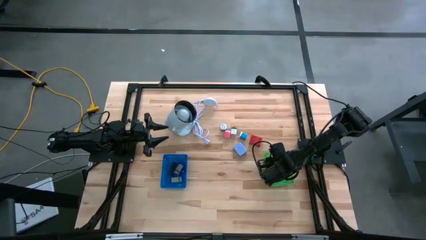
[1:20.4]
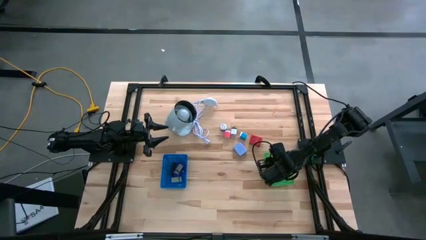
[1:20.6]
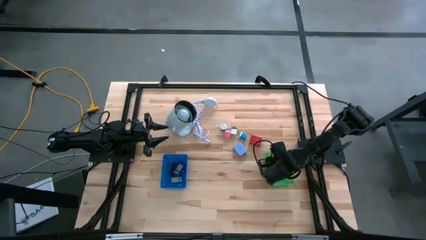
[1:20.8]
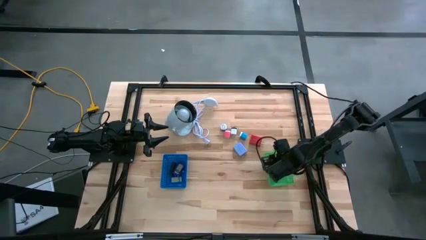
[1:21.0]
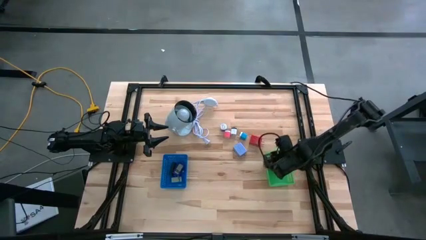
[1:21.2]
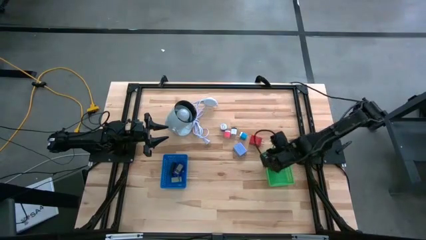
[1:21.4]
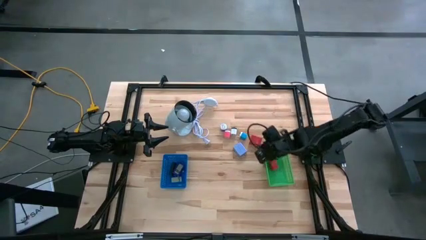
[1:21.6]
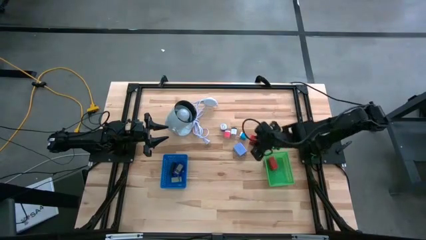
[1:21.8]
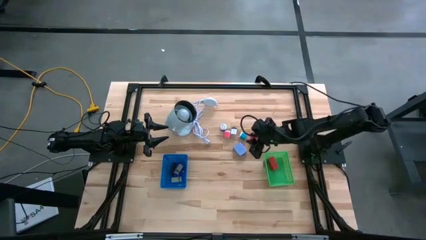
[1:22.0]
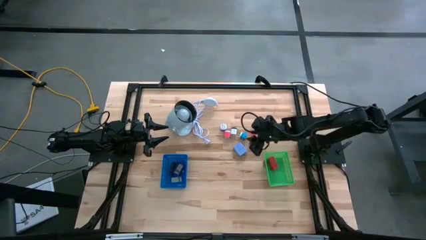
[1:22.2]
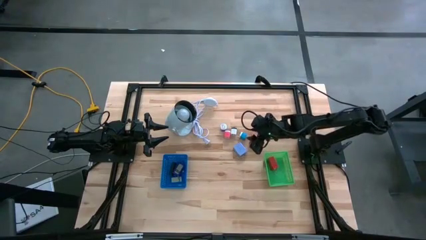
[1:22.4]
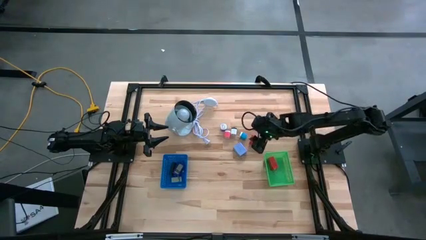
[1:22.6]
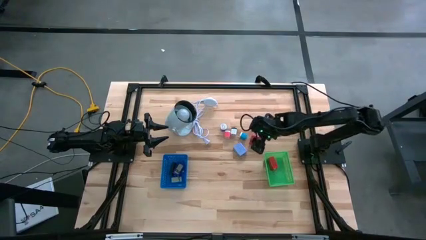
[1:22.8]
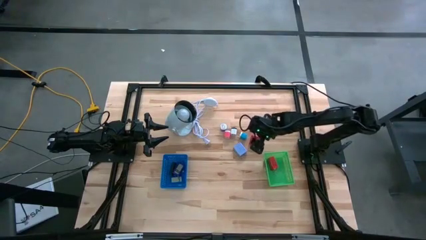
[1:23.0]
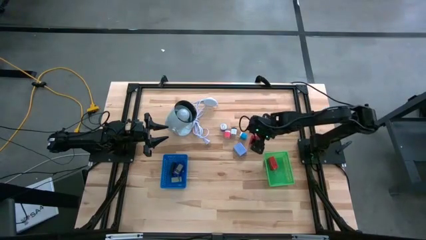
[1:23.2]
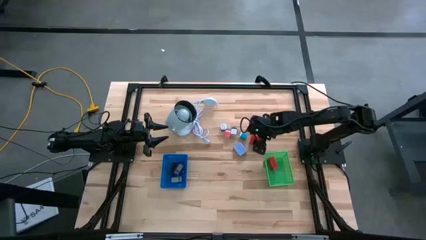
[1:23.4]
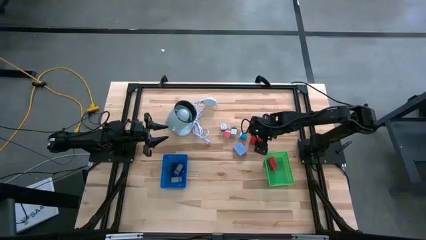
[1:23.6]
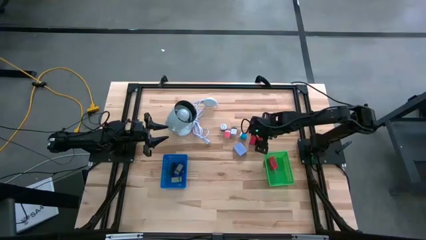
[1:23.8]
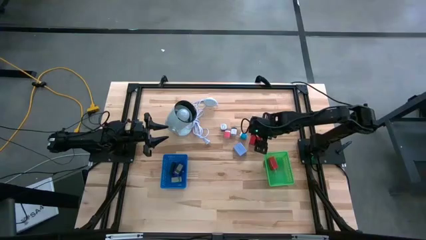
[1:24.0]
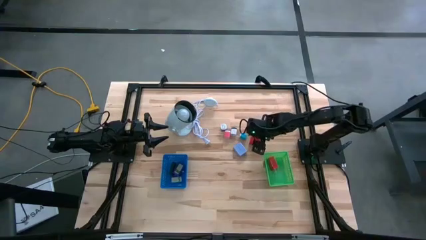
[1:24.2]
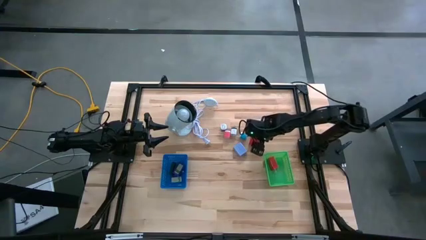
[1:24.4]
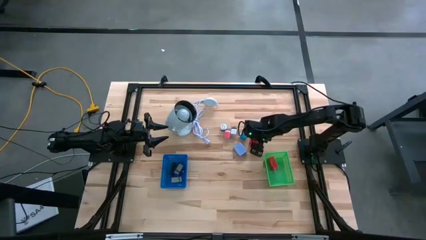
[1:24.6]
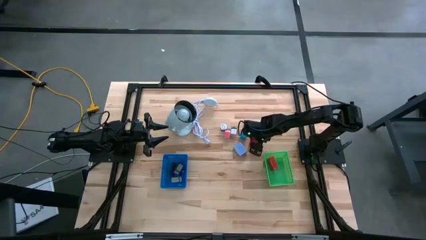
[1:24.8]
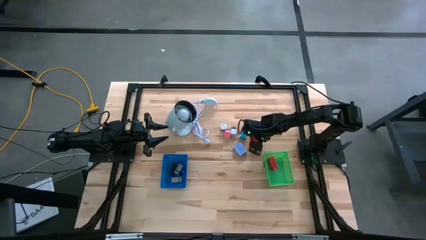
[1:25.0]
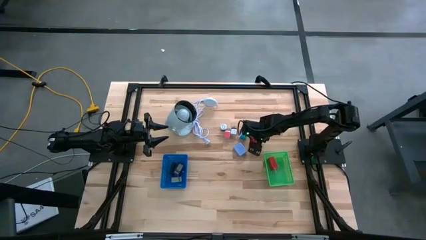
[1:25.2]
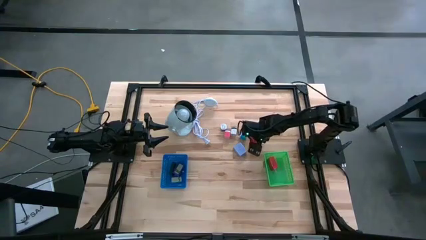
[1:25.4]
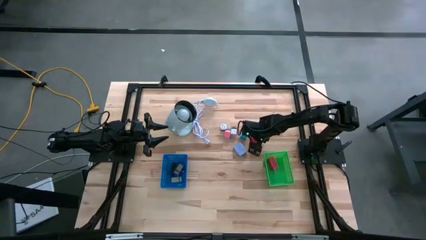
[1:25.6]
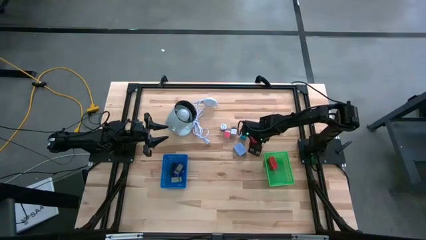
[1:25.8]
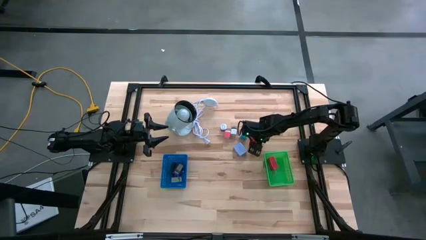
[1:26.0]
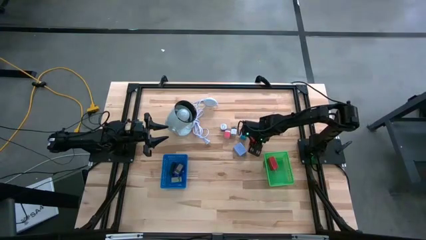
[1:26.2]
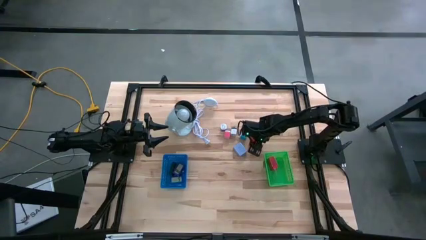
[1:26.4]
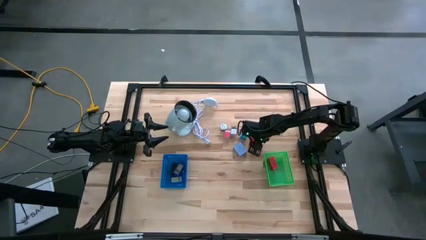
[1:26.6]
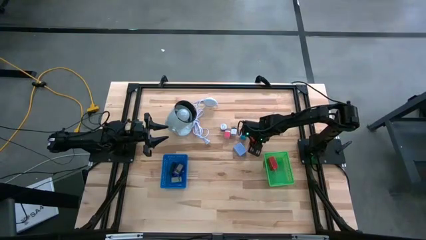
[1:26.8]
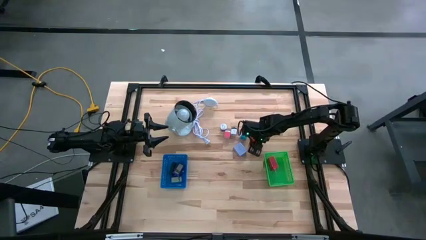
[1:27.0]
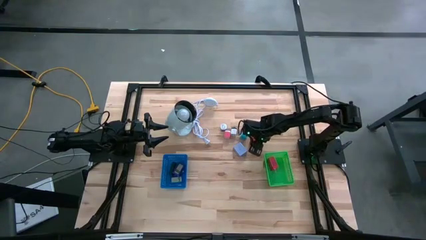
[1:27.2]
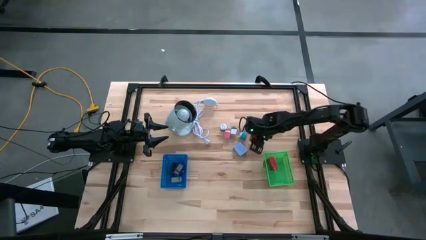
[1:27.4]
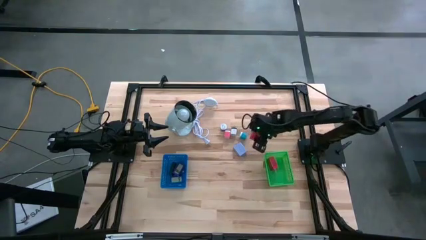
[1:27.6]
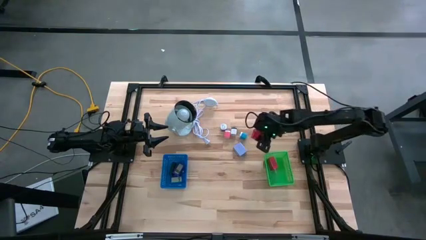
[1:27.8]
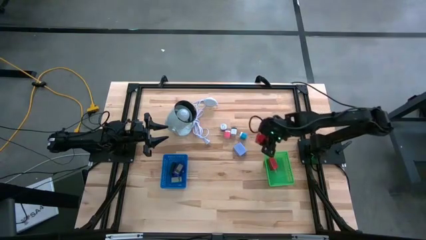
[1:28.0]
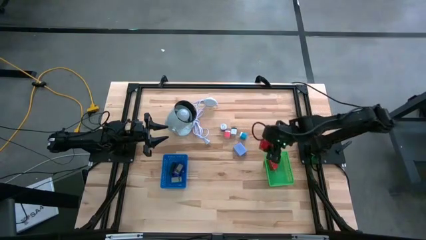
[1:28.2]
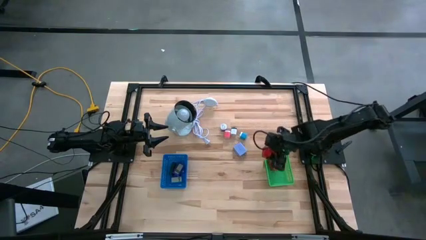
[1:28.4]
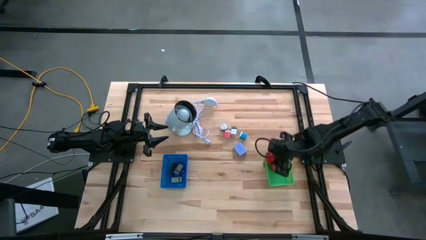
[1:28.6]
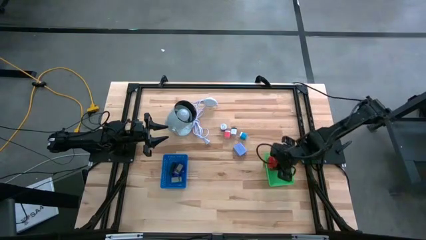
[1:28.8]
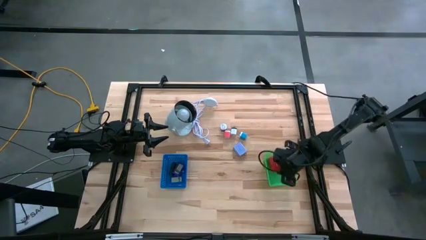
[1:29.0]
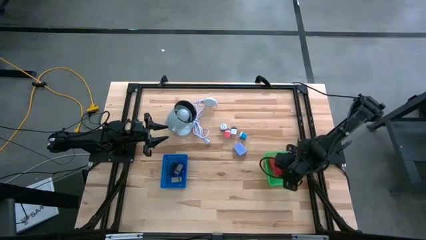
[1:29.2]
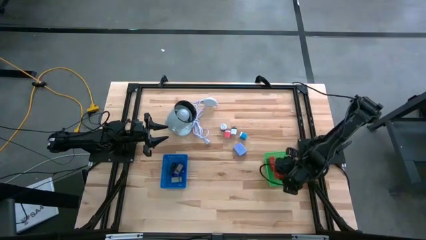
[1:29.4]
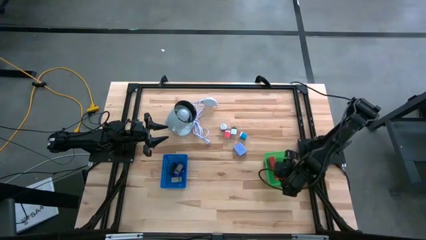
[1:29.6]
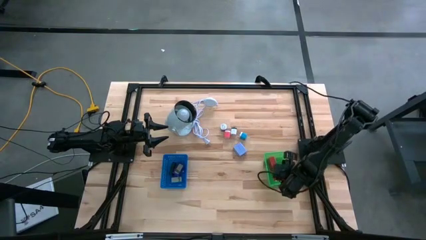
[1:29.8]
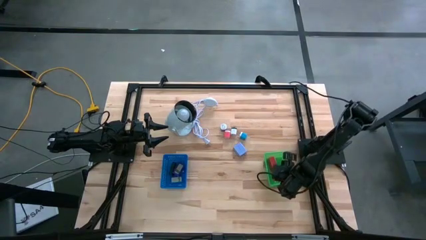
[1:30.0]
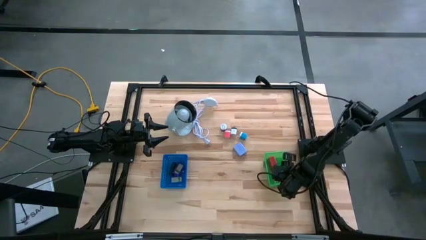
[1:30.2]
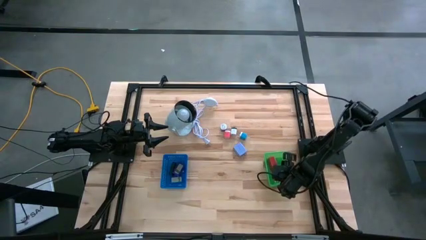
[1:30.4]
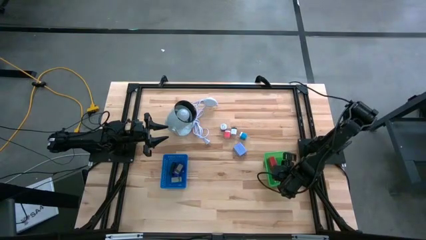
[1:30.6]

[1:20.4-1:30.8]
Task: Pick & Place Office items
Put the red charger adapter into the green bin

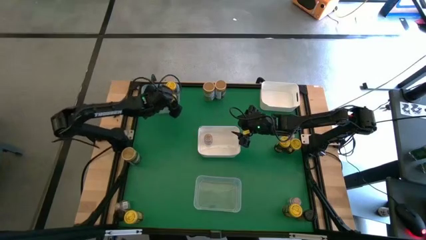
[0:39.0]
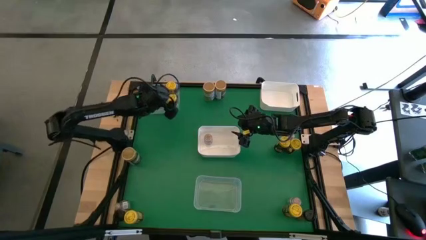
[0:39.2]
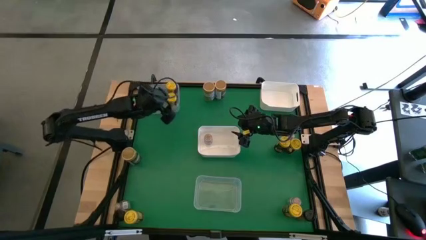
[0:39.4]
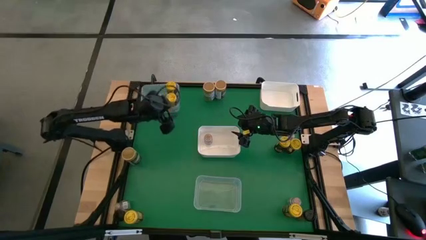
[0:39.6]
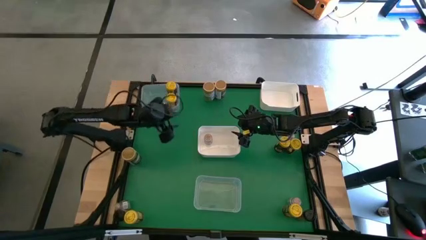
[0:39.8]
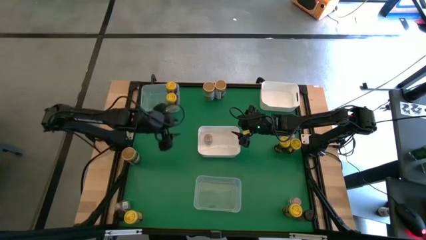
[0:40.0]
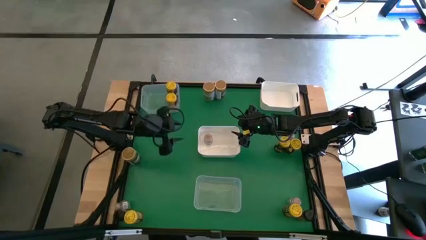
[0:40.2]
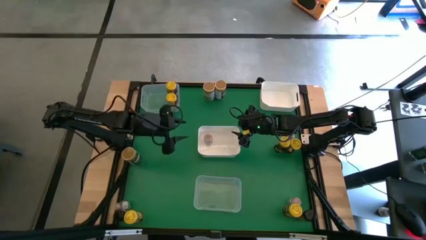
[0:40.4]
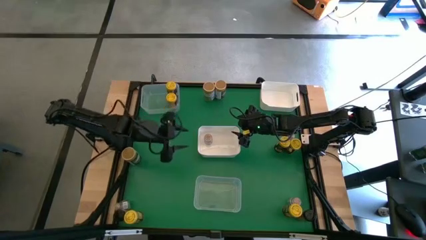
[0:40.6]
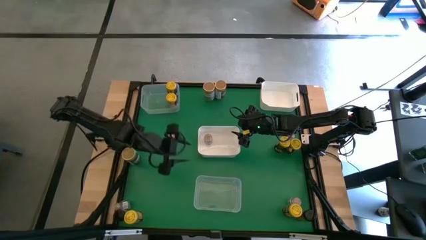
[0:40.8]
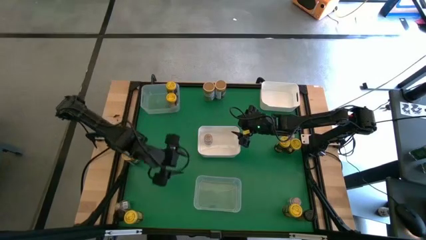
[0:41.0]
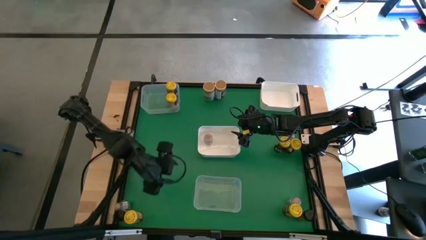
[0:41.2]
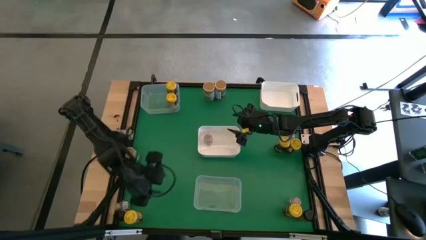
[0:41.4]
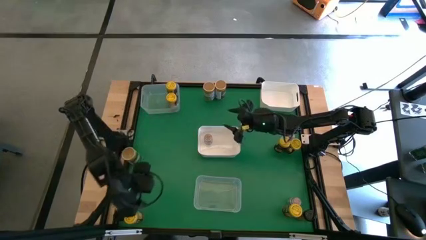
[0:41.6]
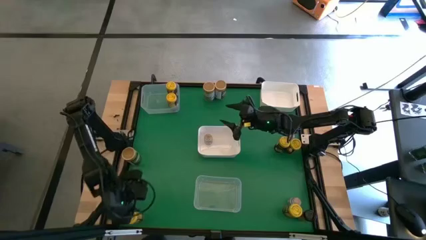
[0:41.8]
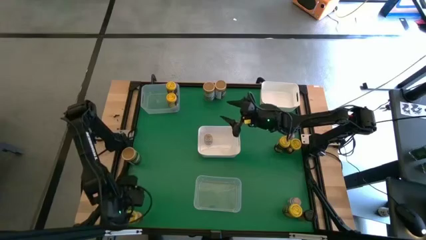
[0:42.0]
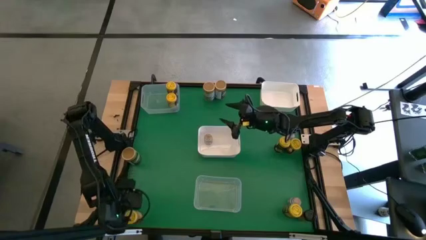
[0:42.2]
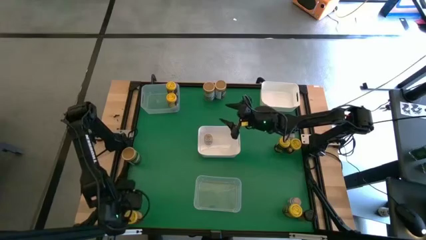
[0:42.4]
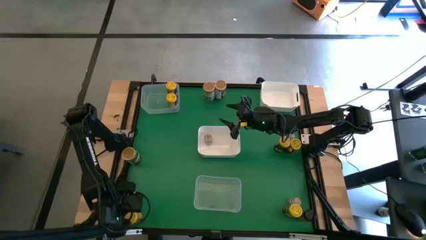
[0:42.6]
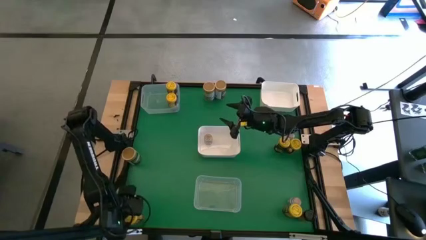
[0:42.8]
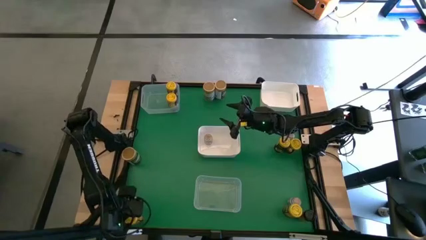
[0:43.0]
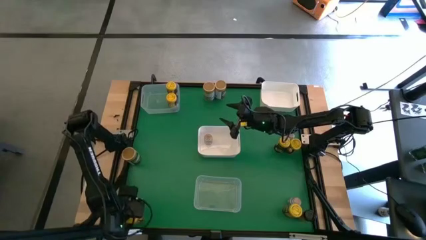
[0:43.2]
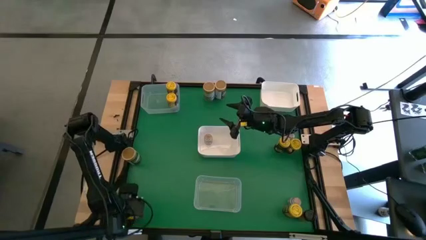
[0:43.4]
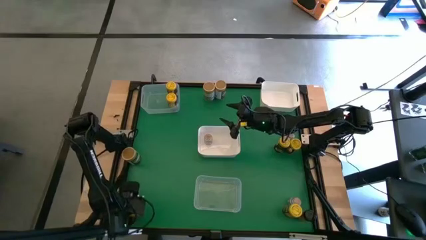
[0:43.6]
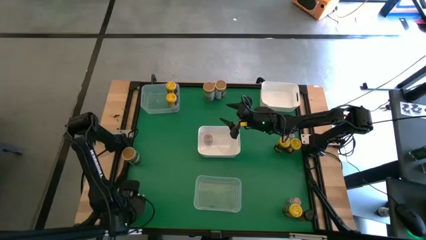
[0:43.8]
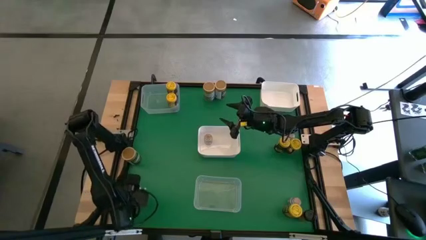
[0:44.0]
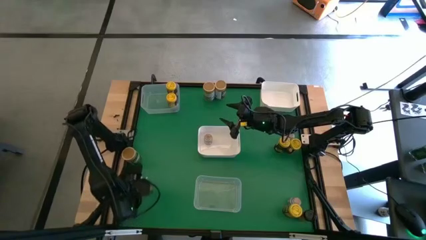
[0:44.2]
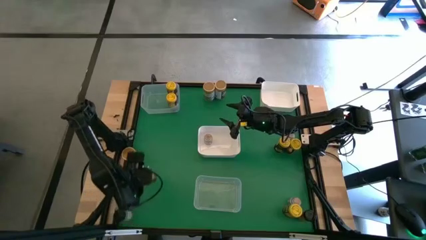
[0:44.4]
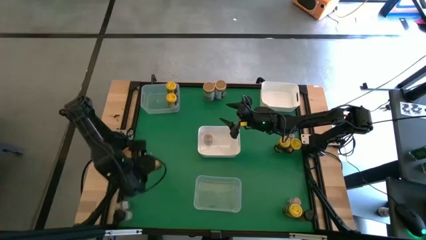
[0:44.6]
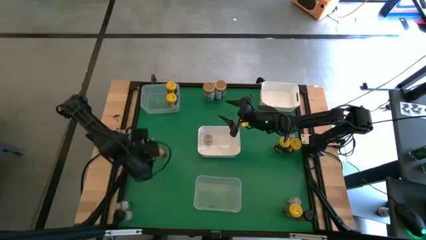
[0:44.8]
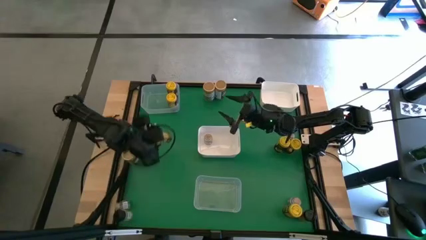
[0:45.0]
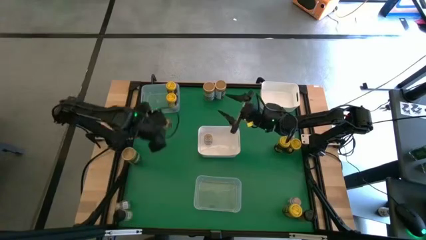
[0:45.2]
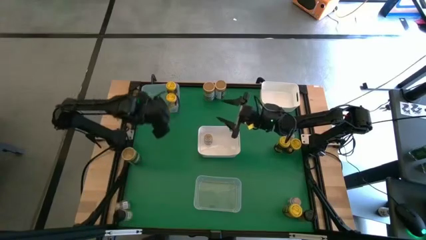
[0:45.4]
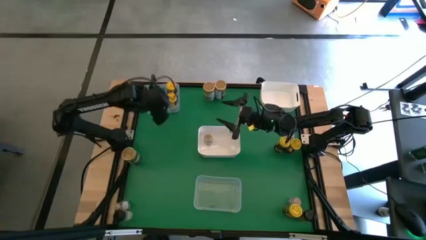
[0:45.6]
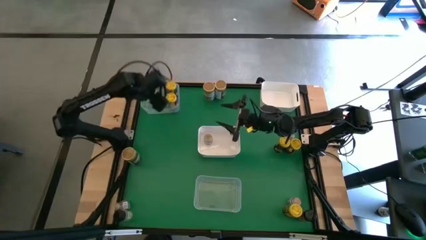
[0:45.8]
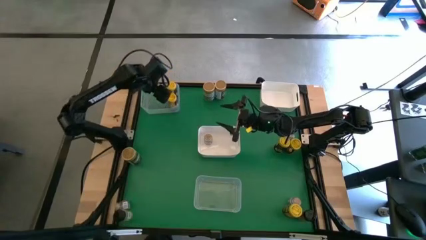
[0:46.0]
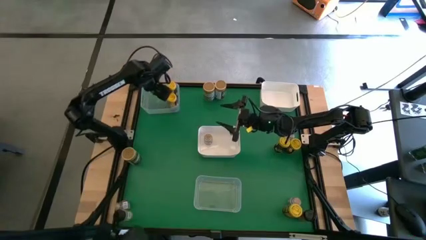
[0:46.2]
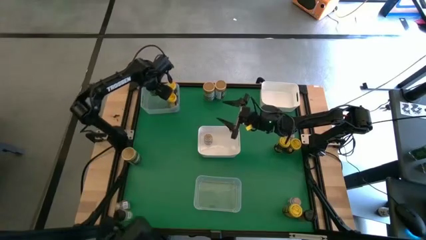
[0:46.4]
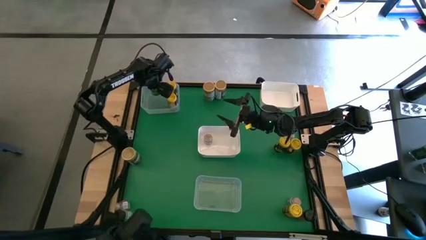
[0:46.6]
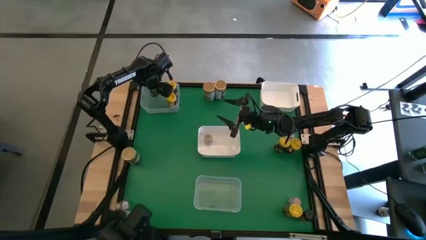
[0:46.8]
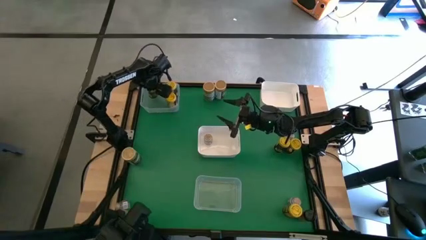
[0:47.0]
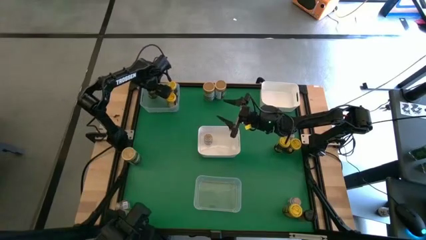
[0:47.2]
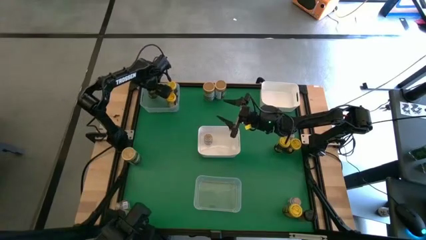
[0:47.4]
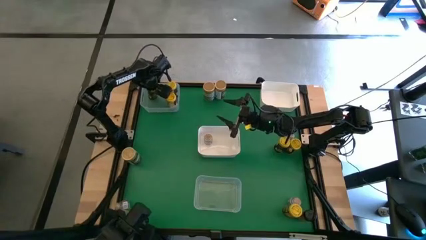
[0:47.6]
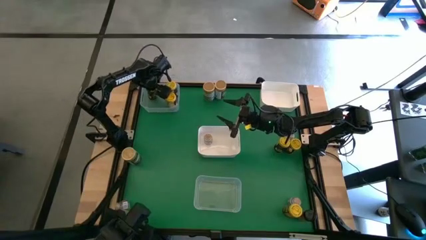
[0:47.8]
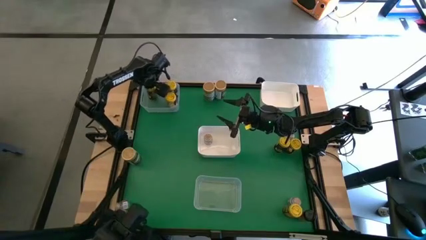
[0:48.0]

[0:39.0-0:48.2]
Task: Sort spices by type
Put the bottom left yellow seasoning bottle into the top transparent bin
